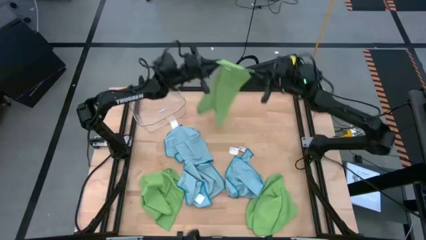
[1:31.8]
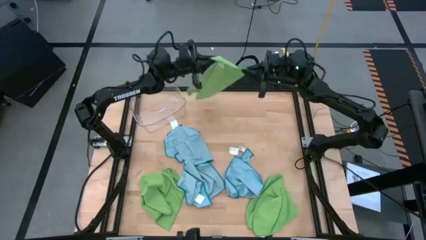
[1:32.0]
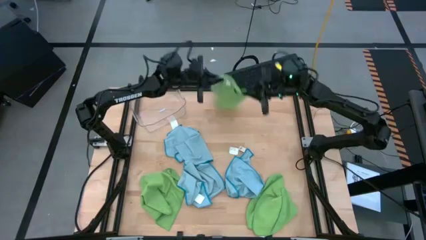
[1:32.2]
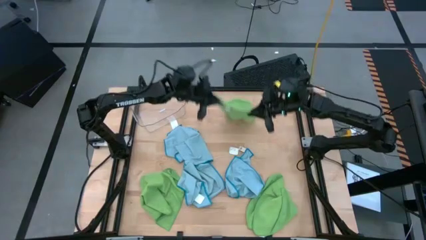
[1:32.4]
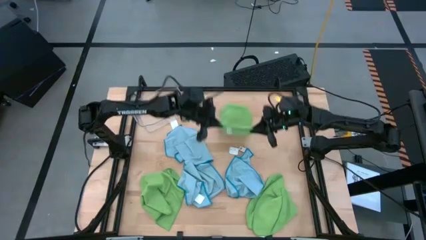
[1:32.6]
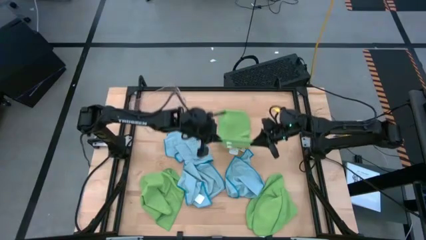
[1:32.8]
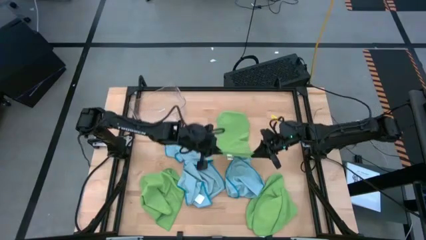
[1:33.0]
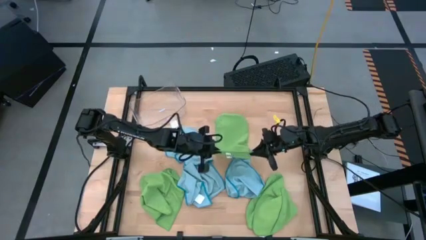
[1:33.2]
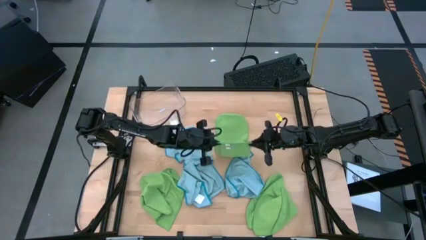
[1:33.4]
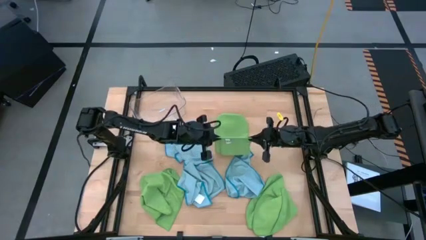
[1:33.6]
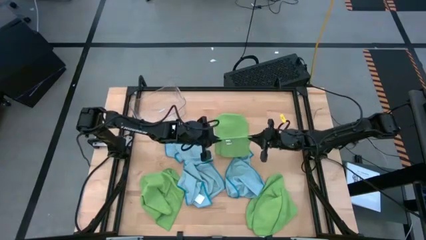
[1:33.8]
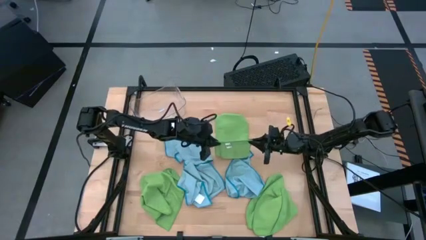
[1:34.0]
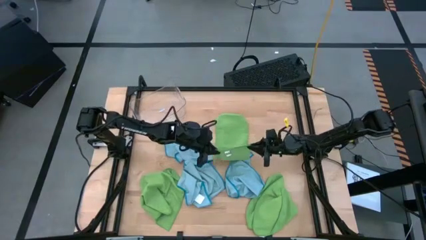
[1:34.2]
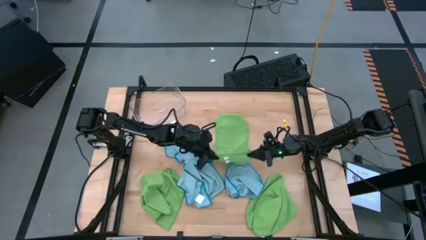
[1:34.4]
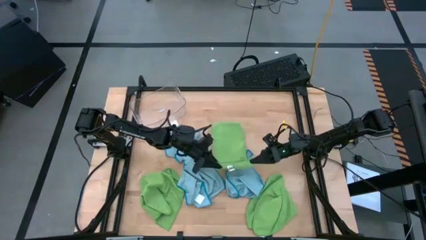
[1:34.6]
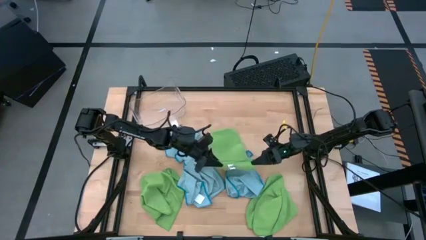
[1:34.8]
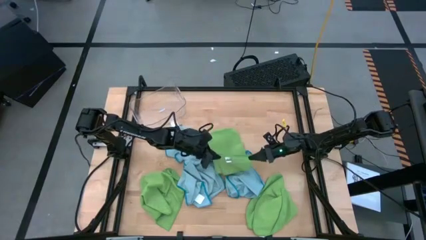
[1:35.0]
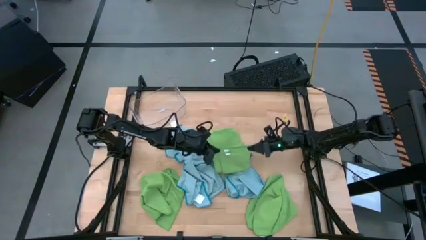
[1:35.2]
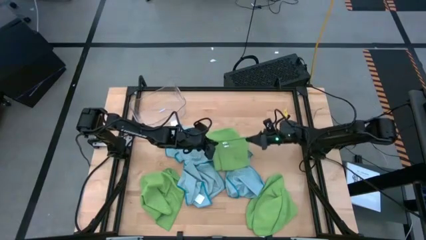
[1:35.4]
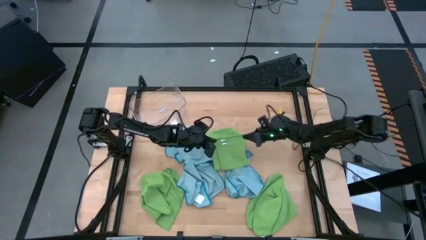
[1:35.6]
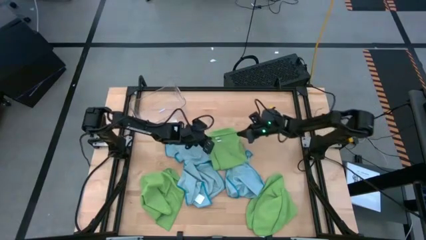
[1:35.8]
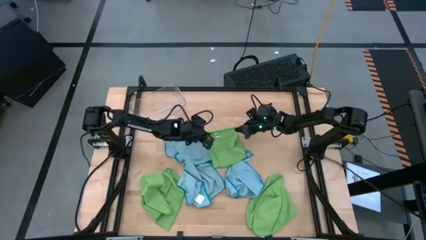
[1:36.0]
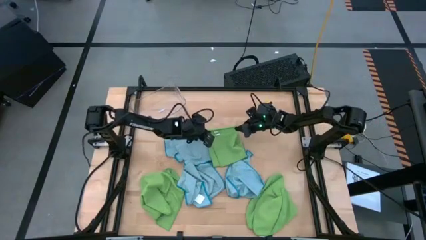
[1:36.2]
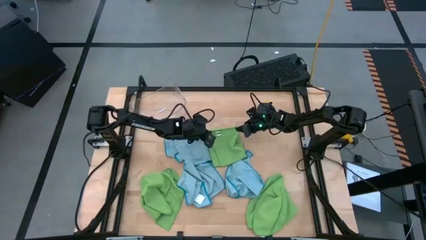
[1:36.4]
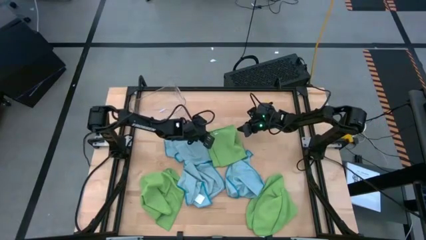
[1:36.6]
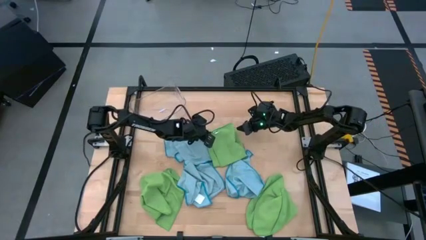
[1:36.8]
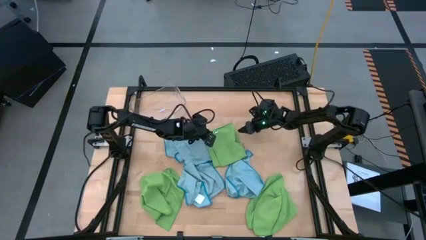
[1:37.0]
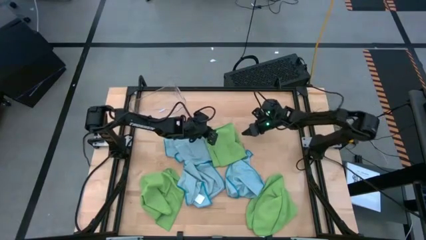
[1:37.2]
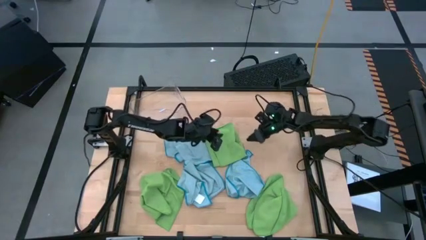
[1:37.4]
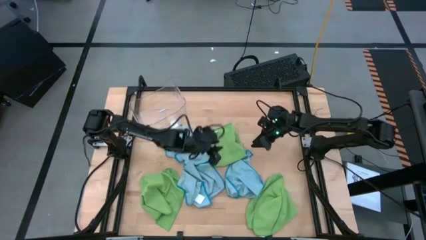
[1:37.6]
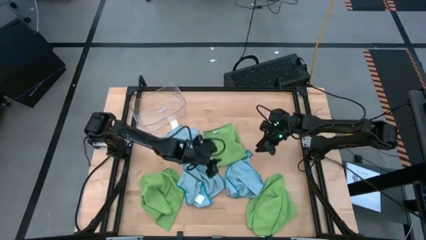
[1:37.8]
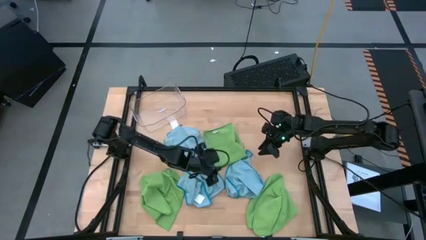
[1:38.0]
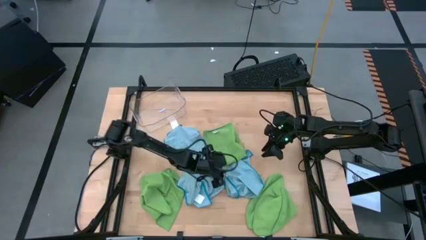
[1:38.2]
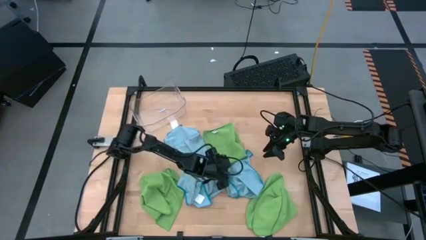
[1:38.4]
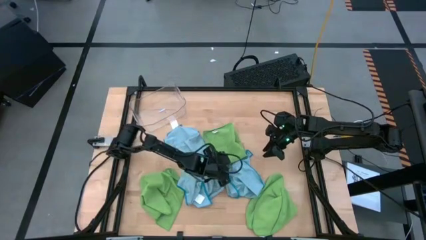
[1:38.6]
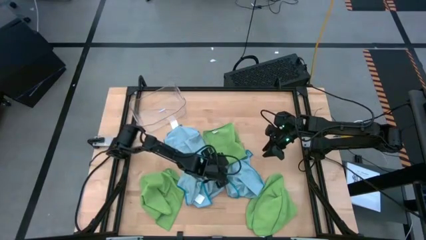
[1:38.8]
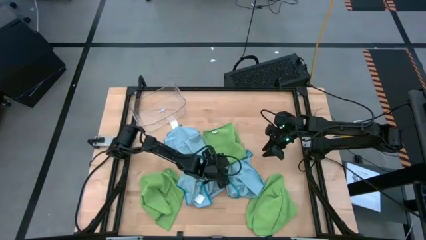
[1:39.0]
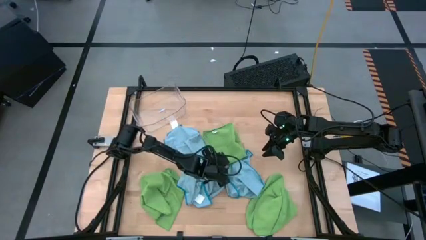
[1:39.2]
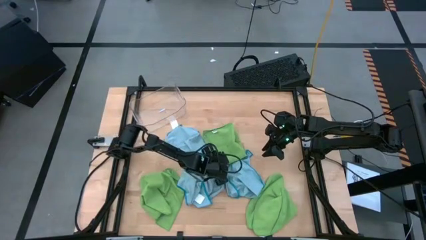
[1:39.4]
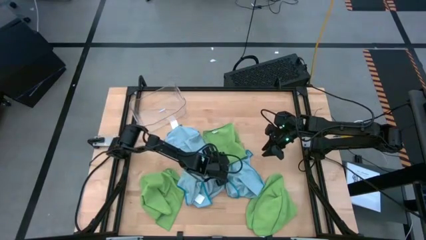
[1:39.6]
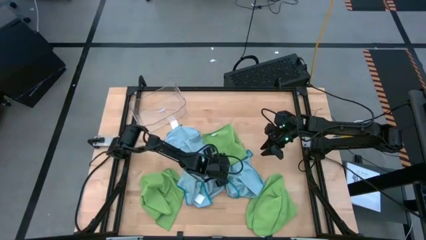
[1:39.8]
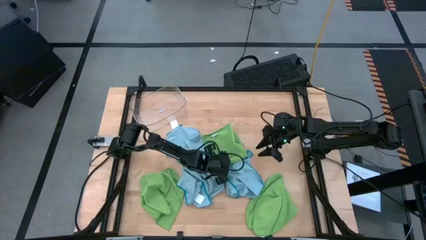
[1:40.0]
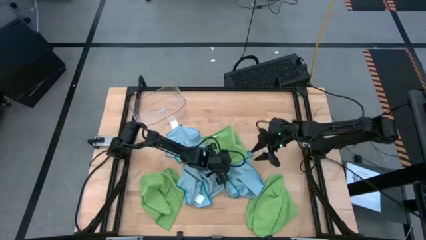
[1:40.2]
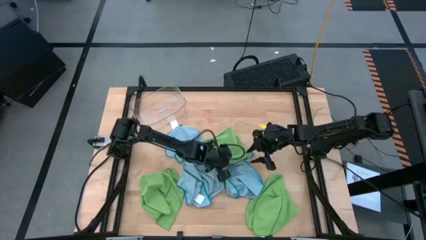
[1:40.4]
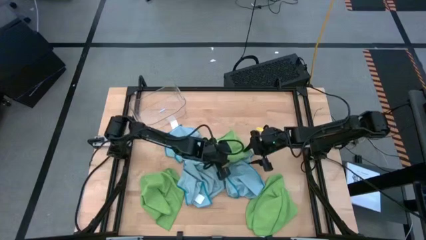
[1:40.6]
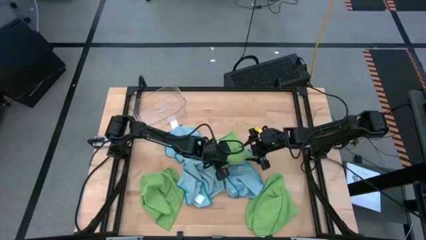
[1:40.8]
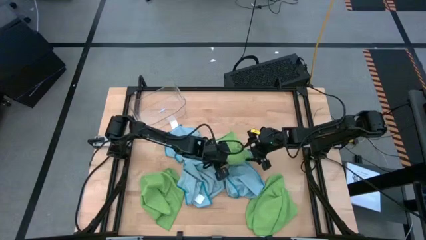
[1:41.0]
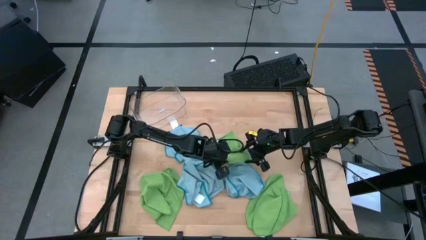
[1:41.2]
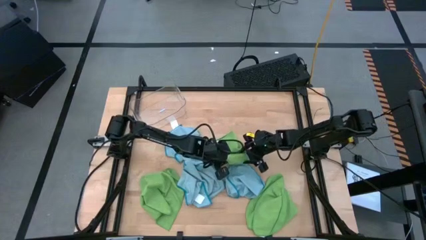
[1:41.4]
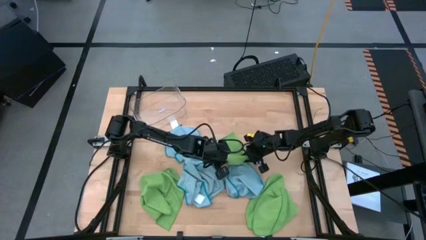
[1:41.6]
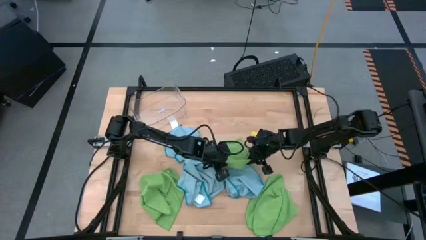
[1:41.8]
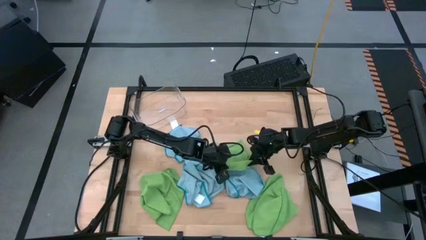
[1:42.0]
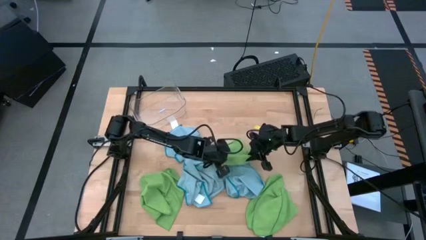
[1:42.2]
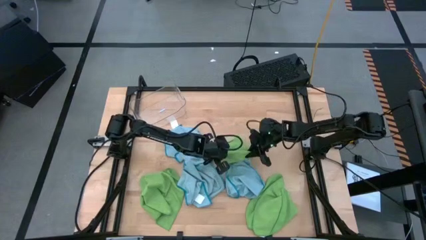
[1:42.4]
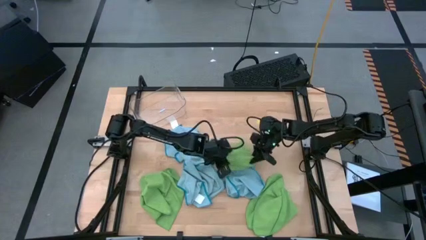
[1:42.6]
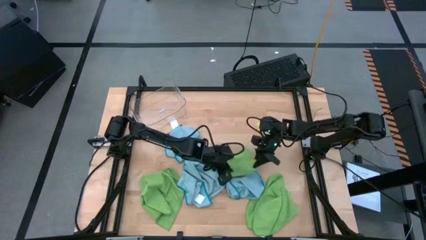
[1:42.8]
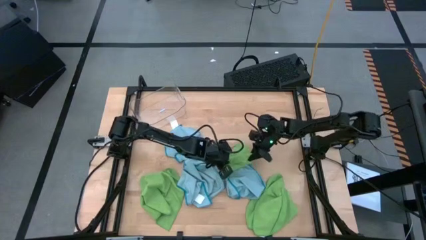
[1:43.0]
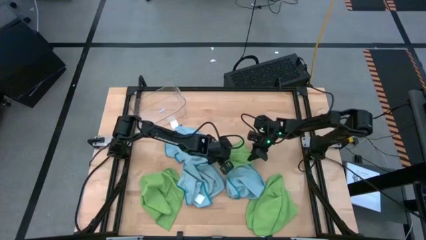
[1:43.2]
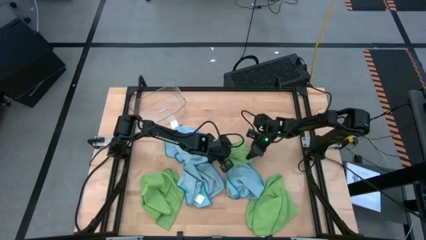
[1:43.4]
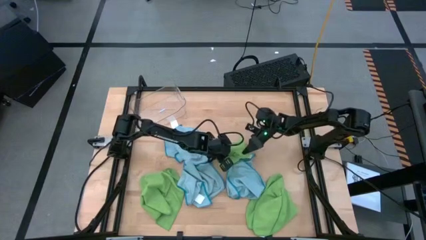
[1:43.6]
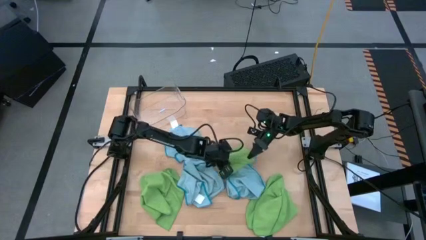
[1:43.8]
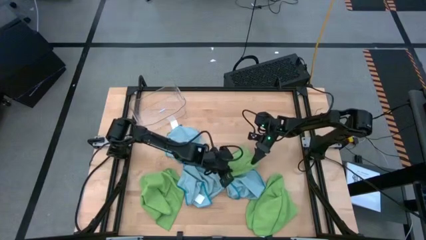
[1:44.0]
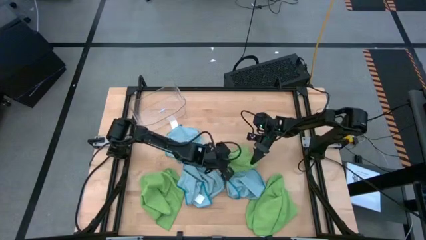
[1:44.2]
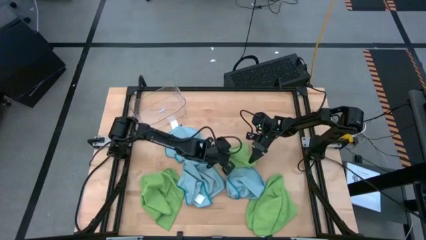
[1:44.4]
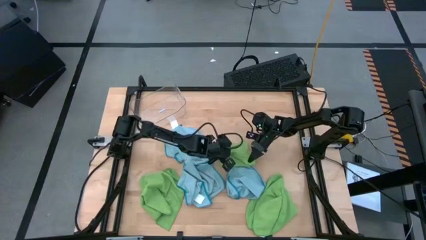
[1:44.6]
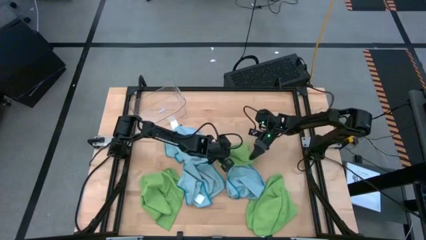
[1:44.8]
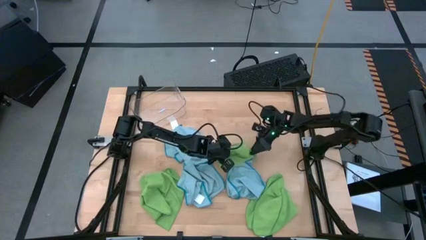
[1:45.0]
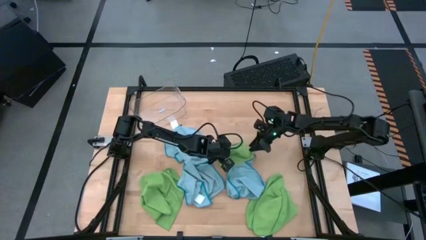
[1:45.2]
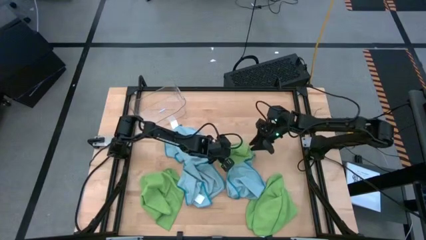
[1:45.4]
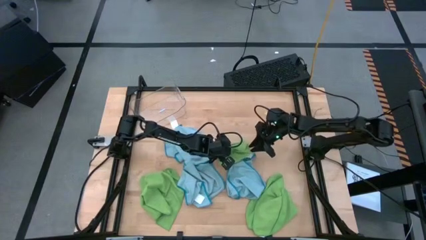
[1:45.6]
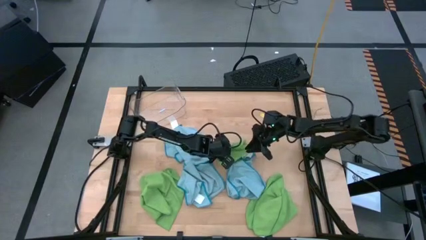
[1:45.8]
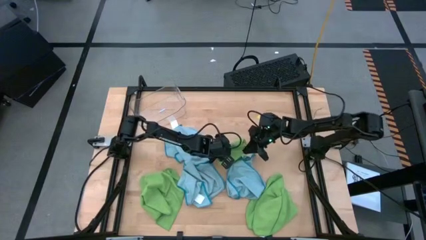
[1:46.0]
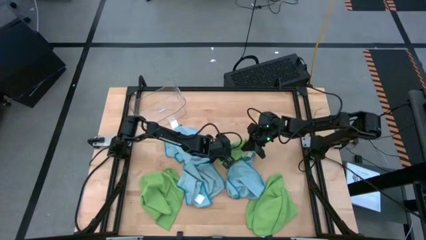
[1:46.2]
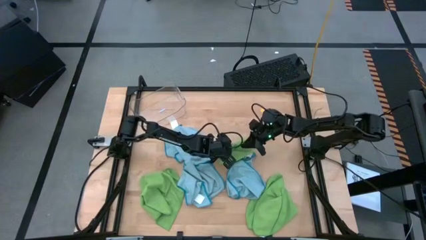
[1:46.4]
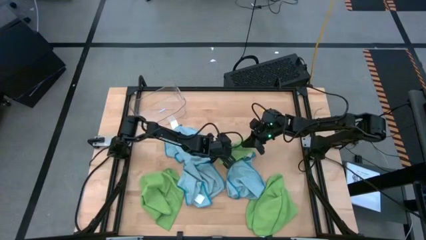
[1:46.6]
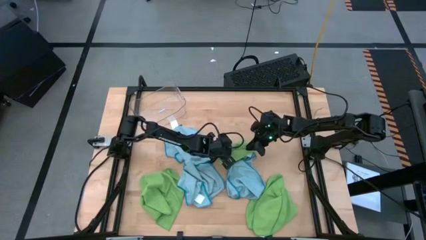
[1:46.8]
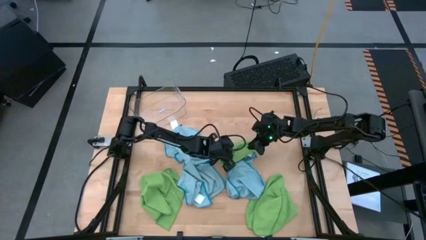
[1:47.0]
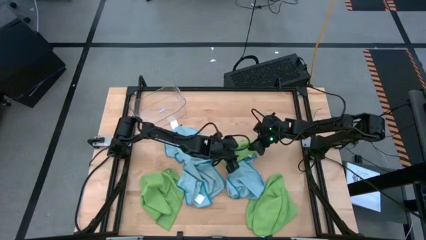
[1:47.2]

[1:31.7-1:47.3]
Task: Fold microfiber towels
Fold the top right green microfiber cloth
